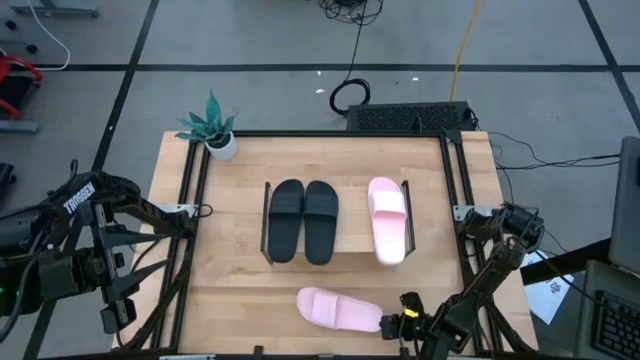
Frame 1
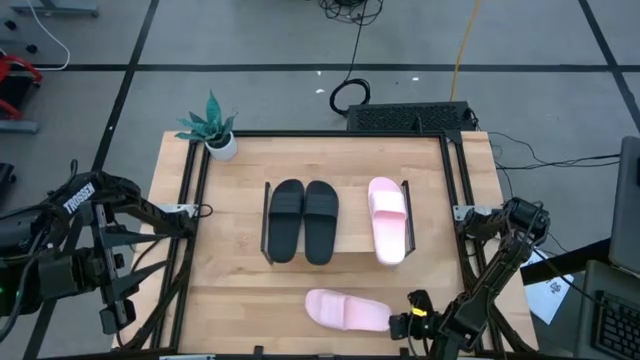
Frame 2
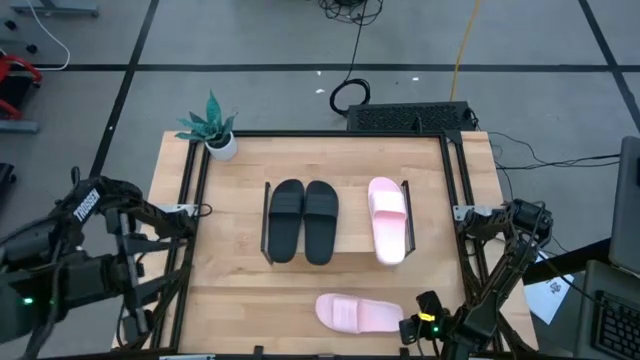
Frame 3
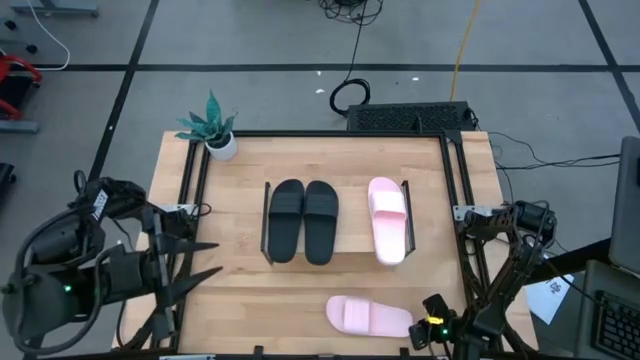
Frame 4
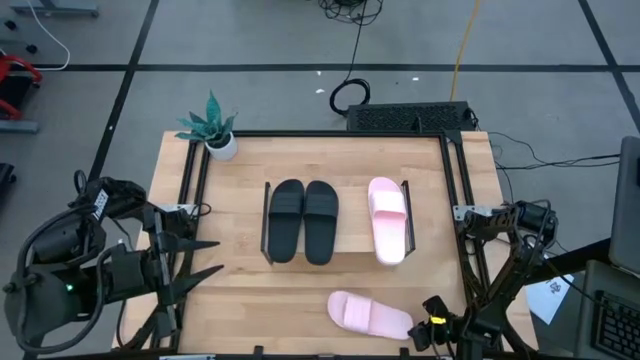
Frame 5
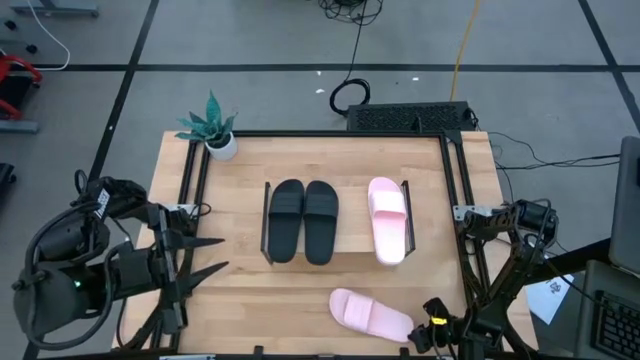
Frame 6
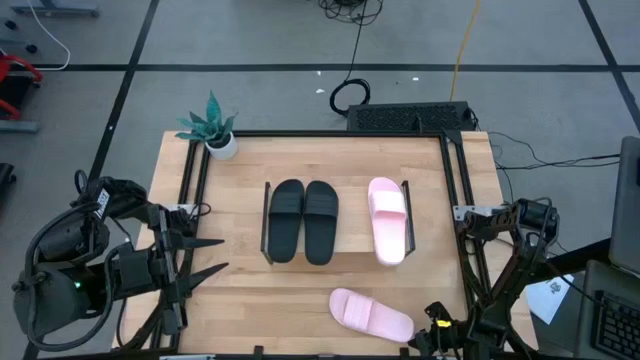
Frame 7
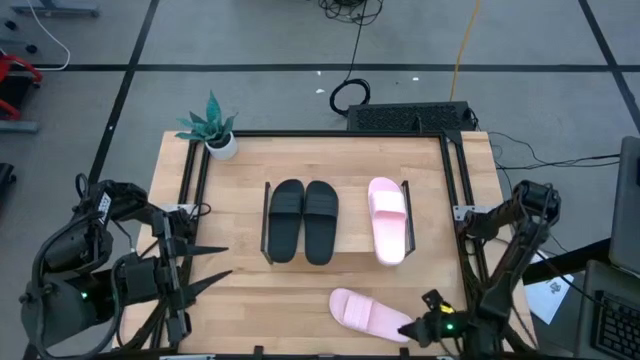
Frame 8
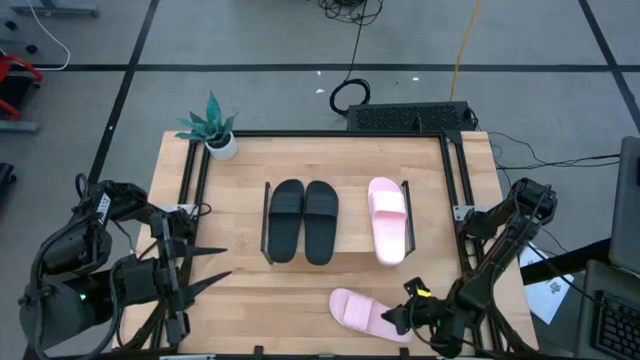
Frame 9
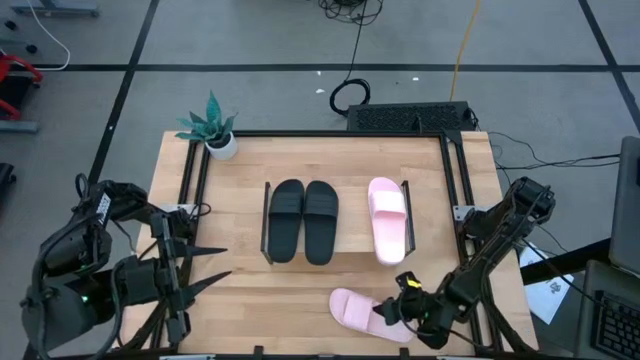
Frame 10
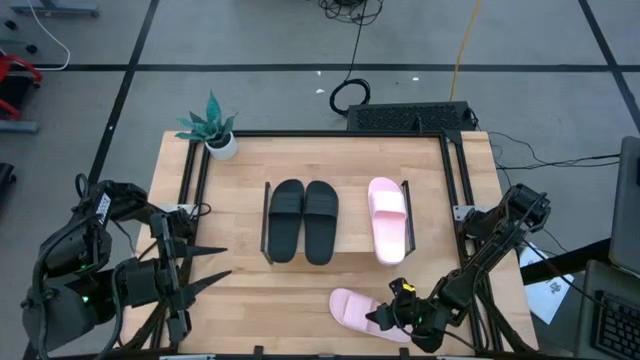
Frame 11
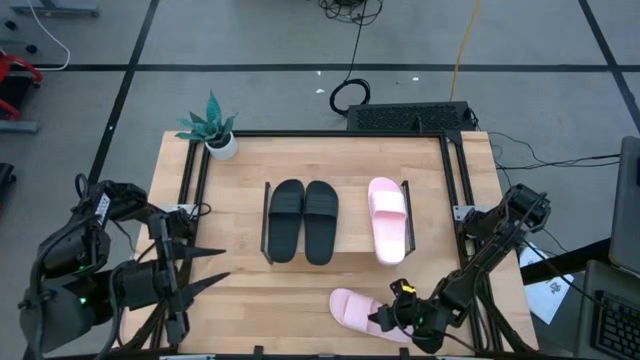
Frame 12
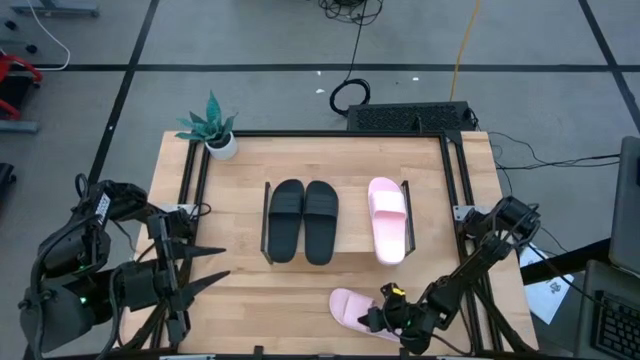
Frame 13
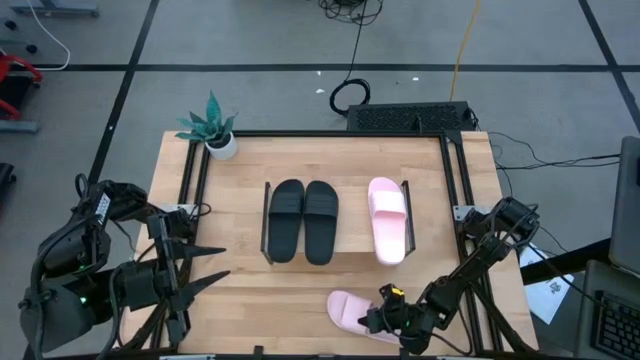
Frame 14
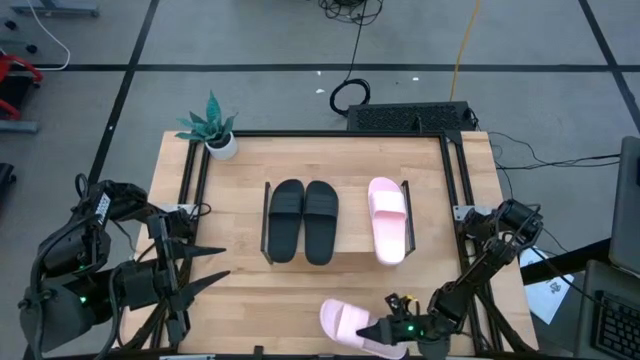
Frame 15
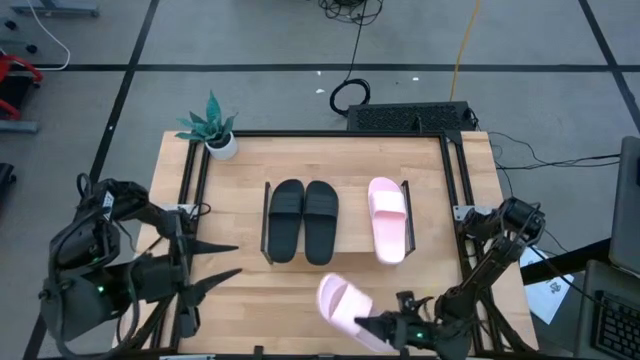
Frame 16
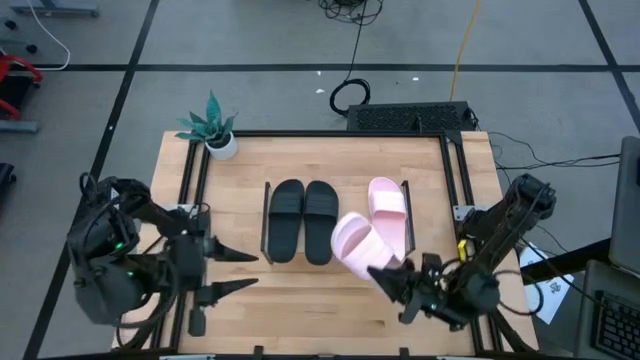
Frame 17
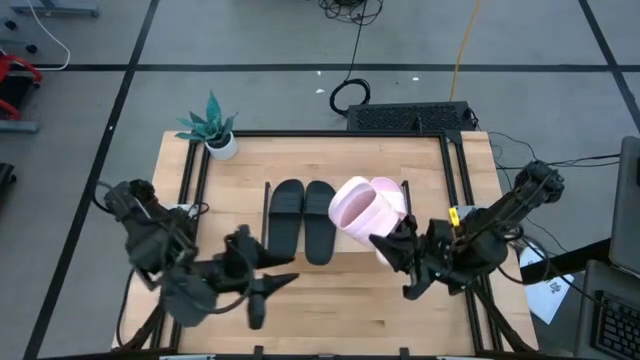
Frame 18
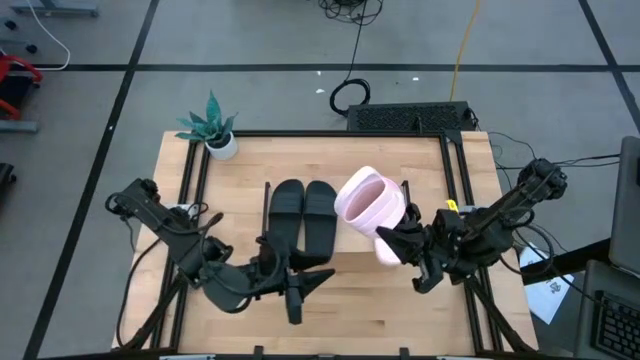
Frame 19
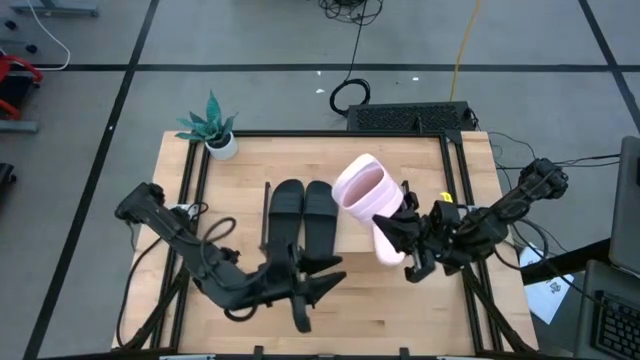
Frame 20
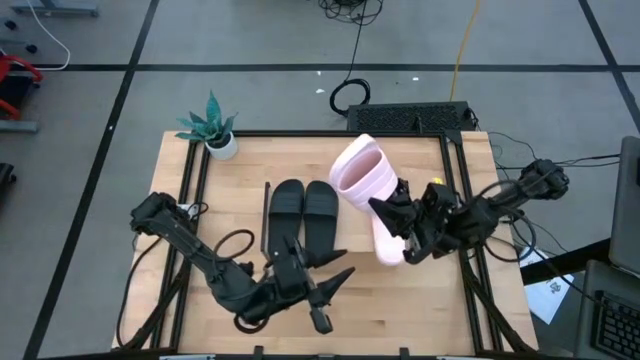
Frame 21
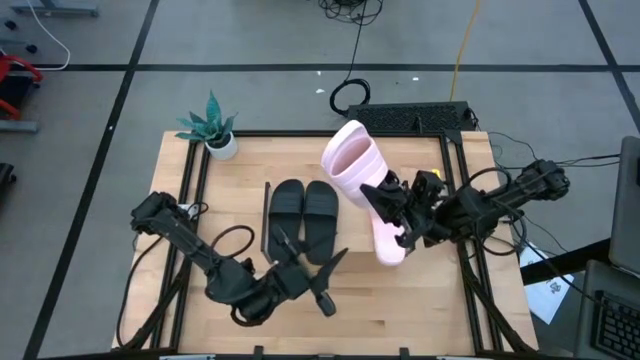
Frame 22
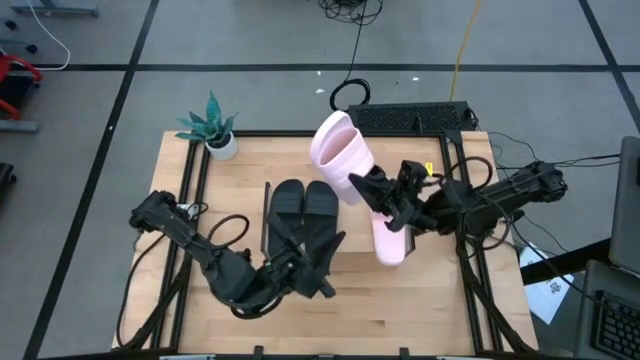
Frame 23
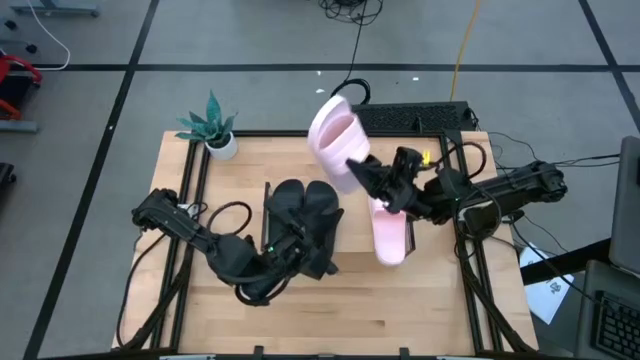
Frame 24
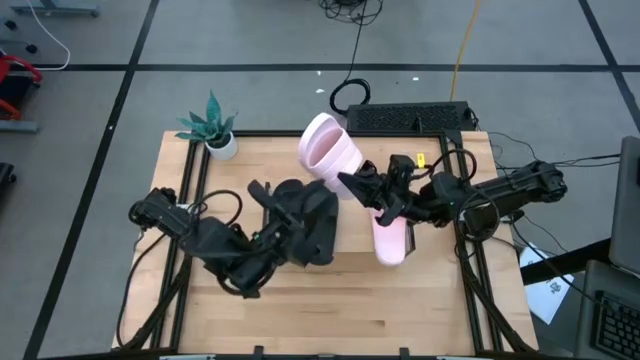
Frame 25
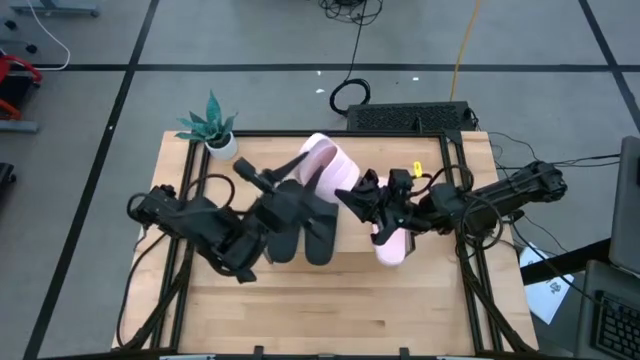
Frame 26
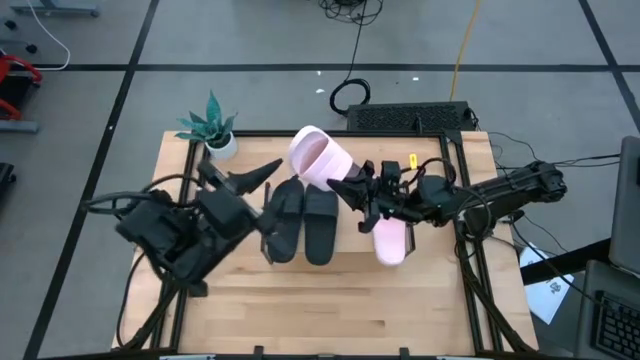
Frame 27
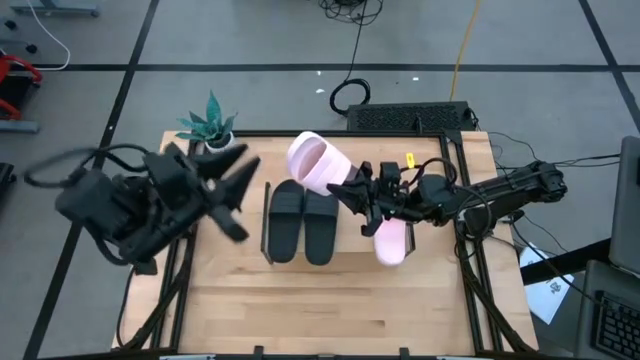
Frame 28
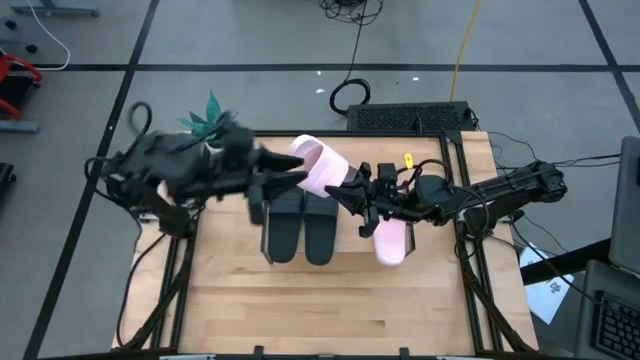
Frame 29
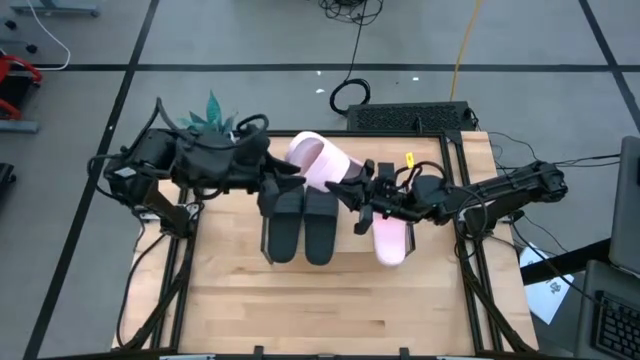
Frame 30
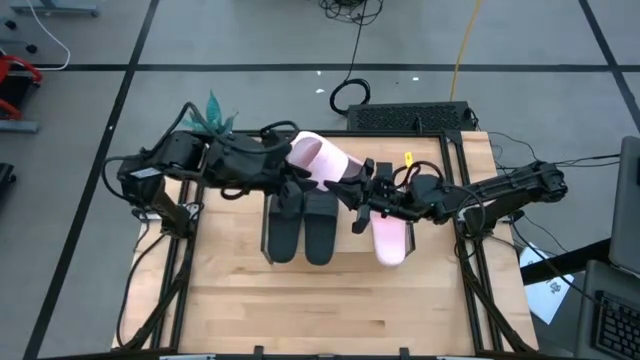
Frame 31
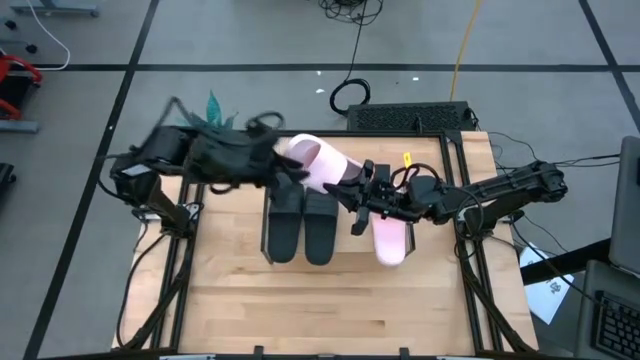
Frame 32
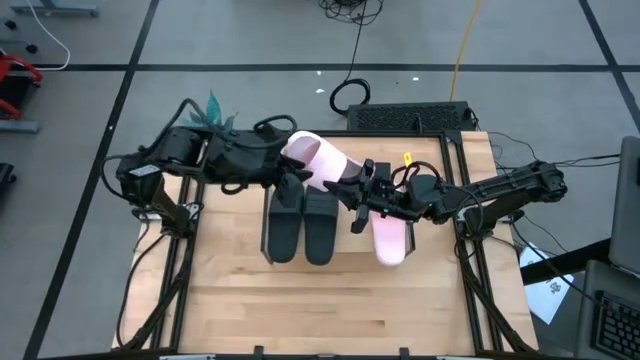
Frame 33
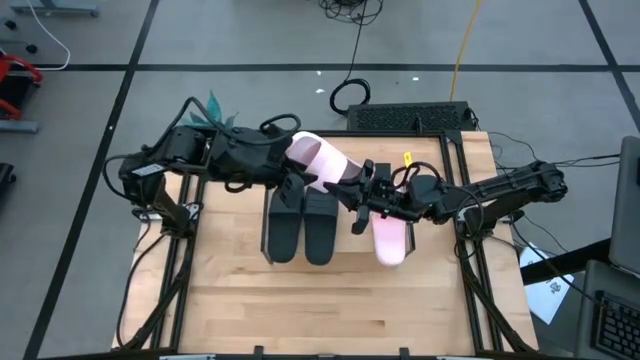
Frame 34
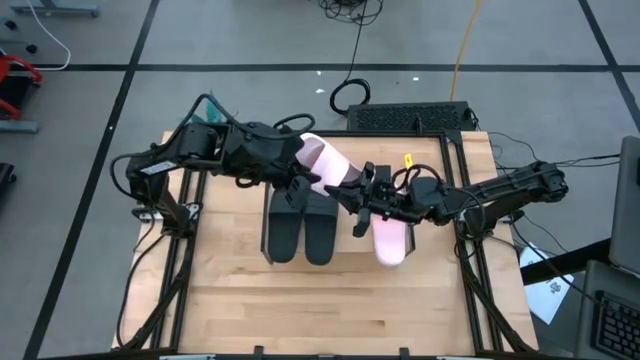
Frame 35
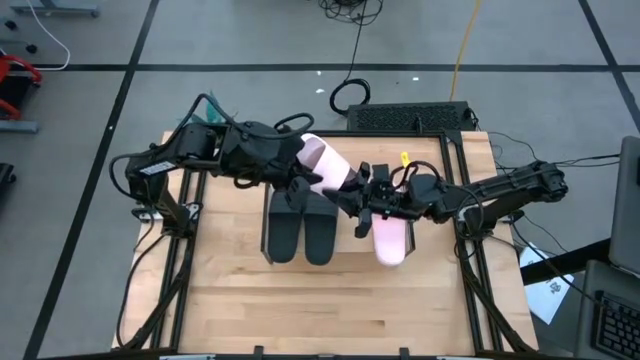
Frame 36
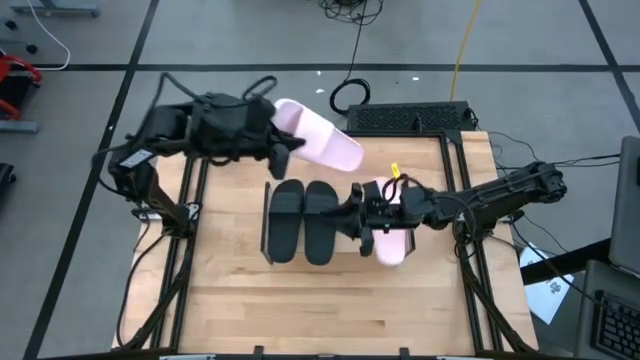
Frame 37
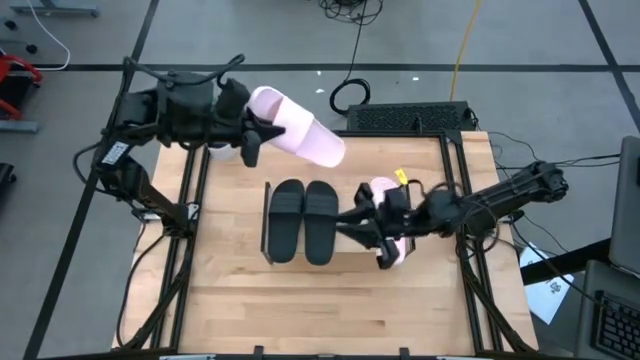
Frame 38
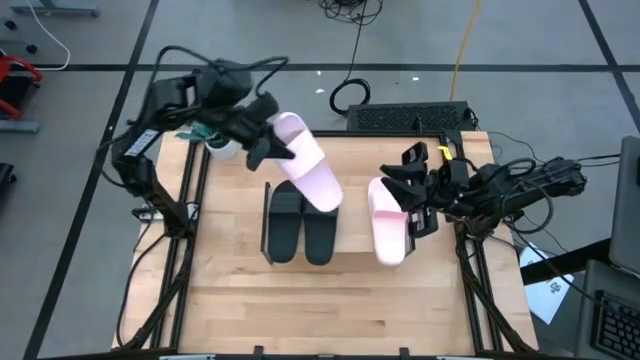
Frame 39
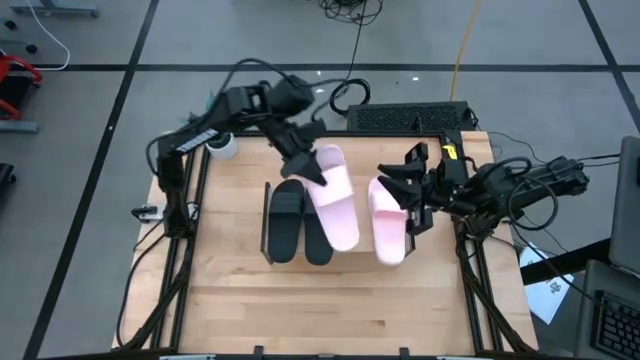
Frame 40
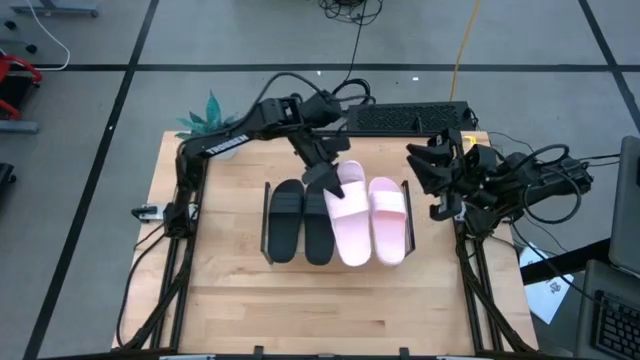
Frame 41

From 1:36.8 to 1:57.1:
Task: Pick and place slides into the shelf
Put the pink slipper on the shelf
